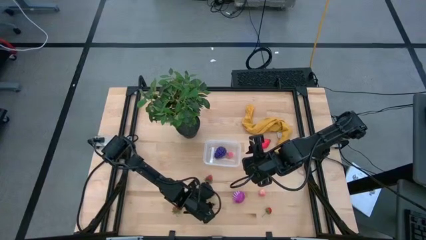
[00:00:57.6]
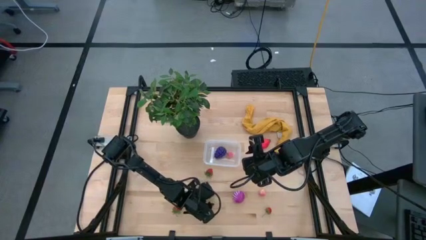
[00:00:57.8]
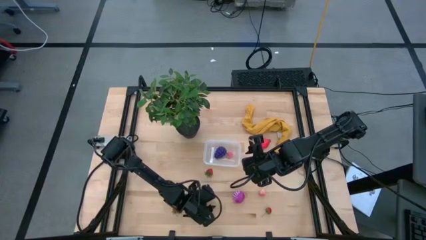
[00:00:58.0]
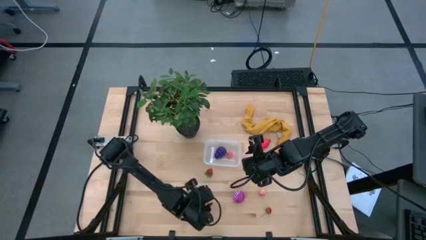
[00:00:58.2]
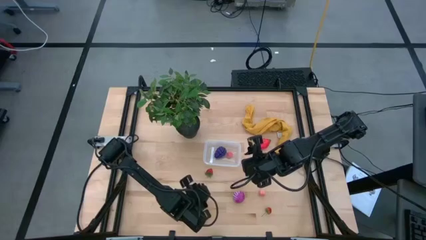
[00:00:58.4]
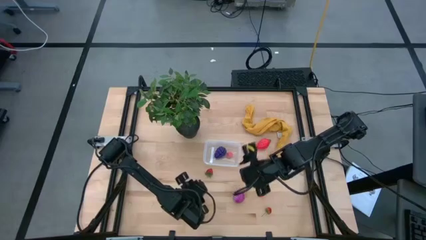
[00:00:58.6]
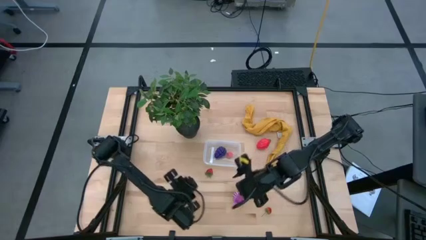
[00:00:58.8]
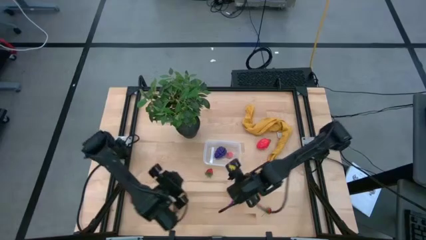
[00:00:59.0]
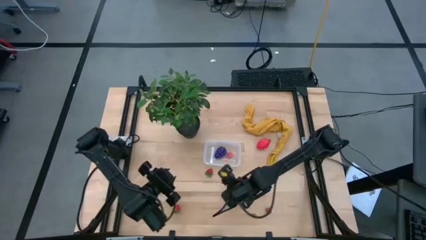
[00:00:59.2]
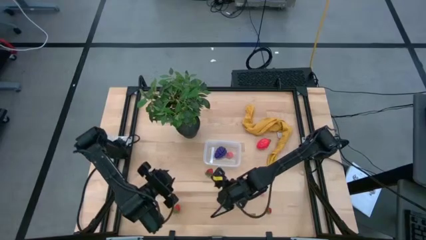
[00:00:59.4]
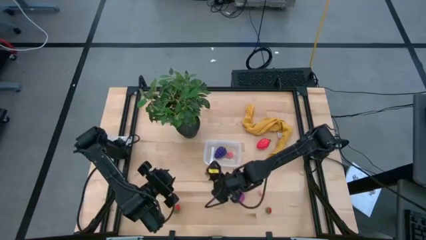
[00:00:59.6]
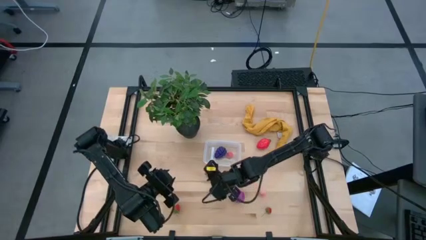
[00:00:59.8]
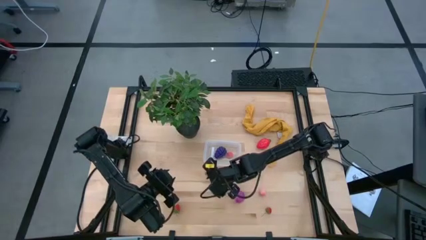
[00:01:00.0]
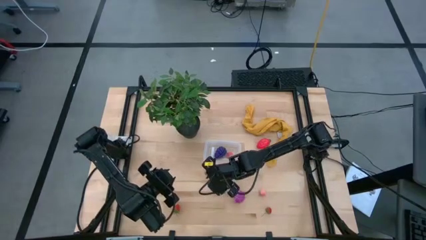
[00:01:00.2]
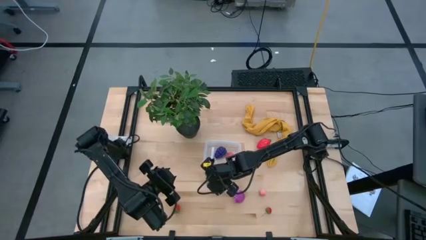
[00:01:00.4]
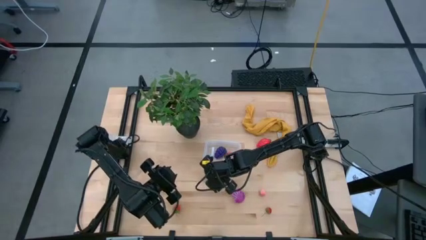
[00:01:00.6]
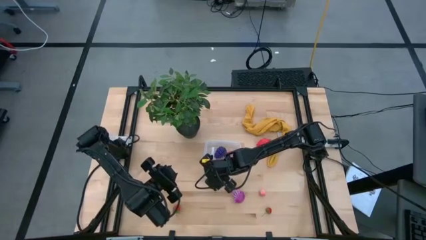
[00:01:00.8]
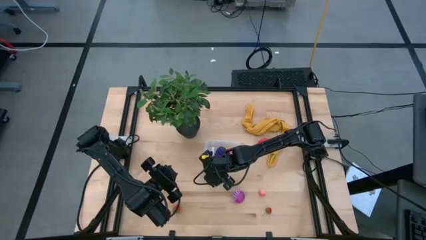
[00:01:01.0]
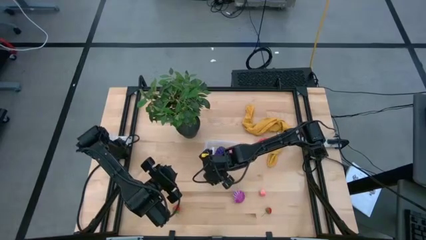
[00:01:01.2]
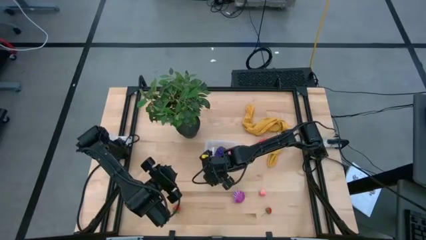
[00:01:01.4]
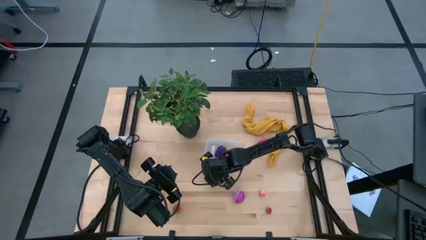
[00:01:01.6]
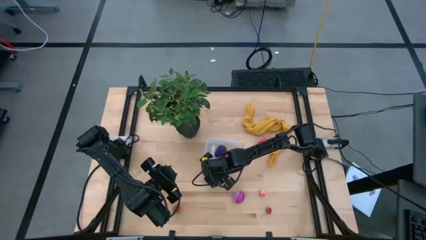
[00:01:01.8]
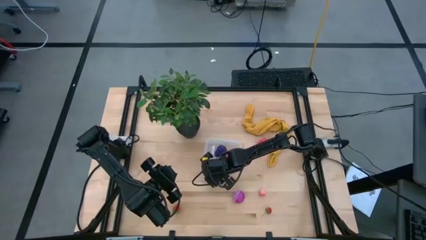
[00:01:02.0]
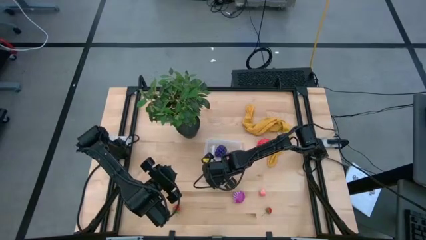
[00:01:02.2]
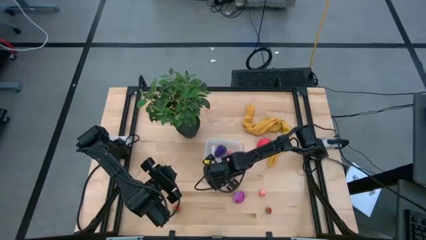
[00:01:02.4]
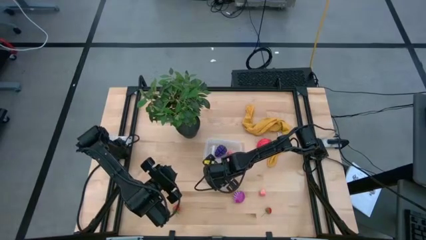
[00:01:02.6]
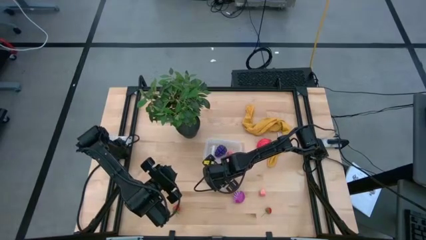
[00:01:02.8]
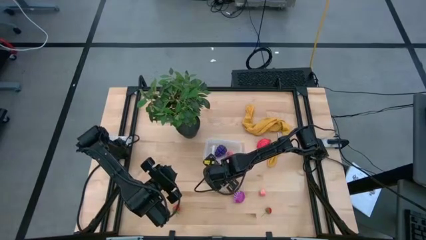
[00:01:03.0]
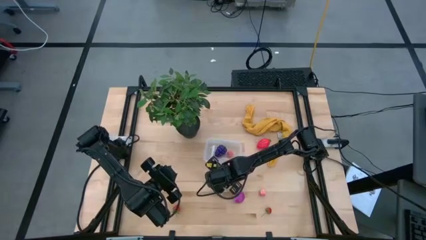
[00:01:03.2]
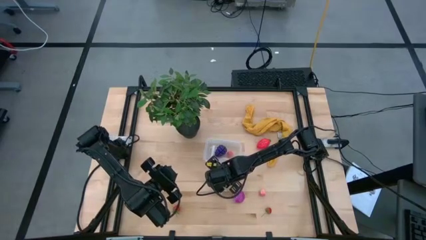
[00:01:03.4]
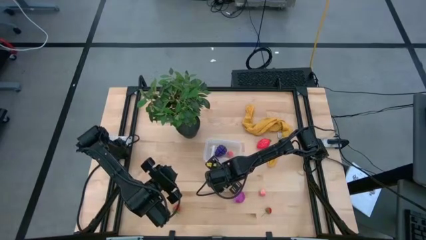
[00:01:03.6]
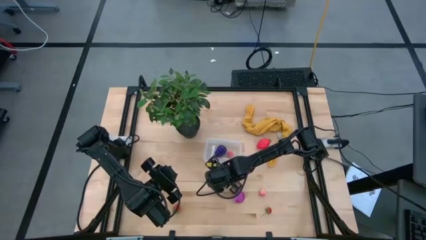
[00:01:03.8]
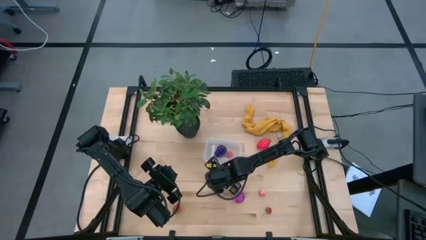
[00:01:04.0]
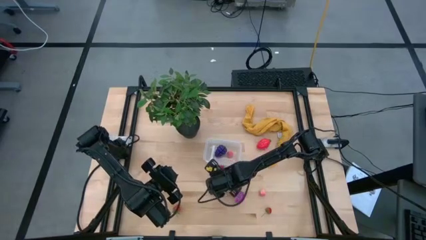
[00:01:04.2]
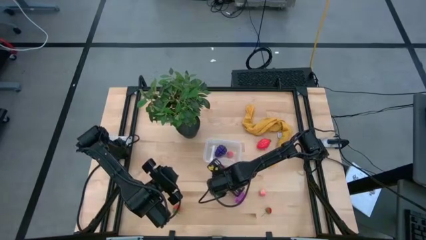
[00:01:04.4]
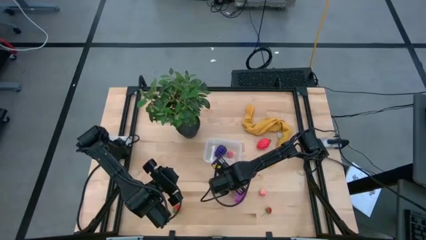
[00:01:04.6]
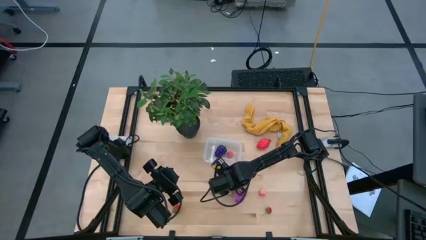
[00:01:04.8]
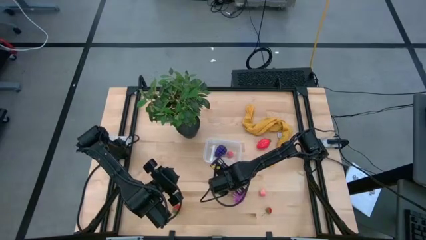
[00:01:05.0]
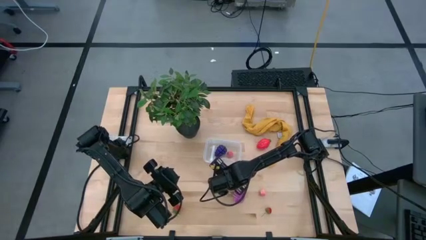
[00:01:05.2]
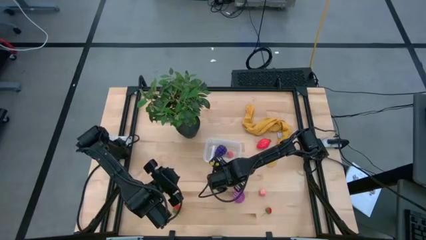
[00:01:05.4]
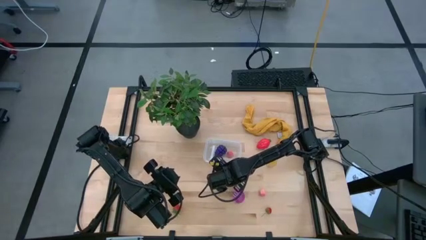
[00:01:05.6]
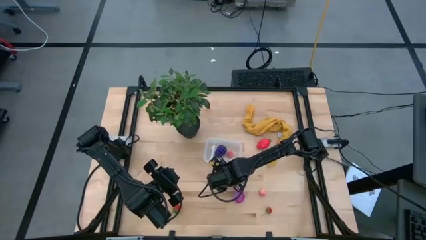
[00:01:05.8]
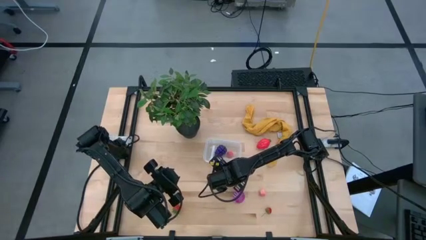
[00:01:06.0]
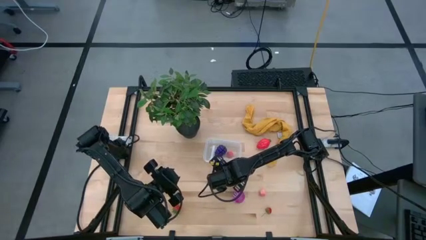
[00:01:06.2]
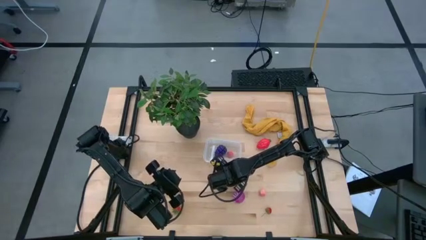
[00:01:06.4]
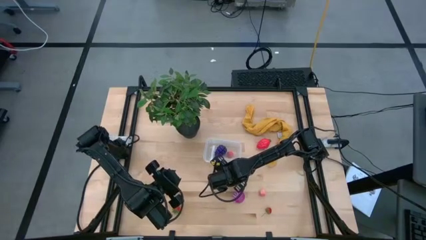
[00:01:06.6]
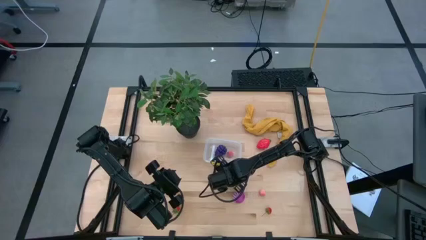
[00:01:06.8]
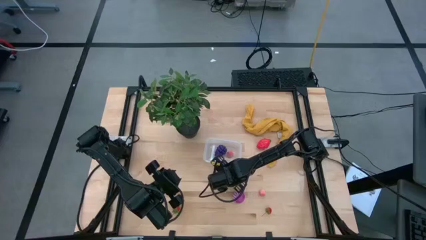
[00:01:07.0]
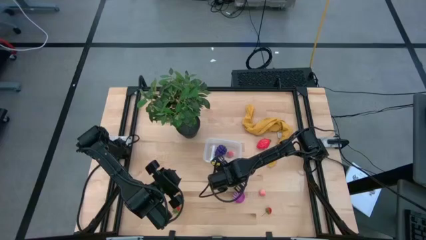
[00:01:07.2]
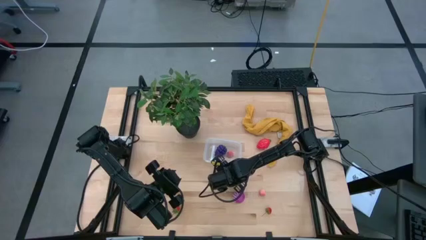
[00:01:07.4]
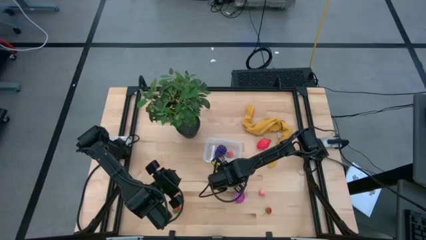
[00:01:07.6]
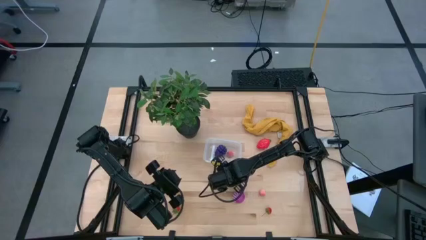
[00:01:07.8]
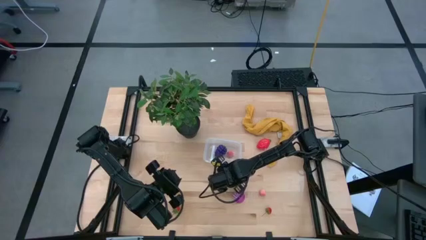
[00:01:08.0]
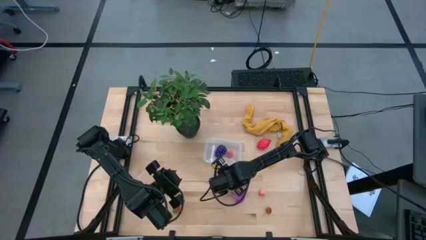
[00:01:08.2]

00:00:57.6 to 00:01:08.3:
Task: Pick and placing Produce into tupperware
Put the middle strawberry into the bin

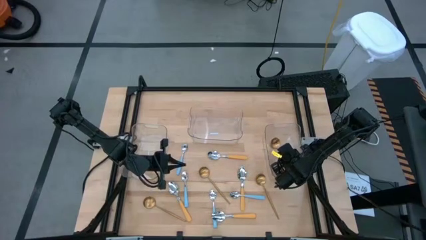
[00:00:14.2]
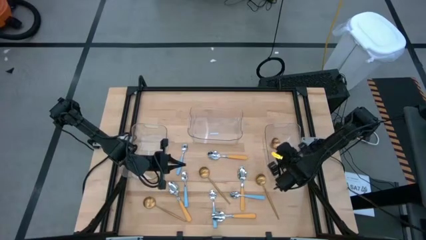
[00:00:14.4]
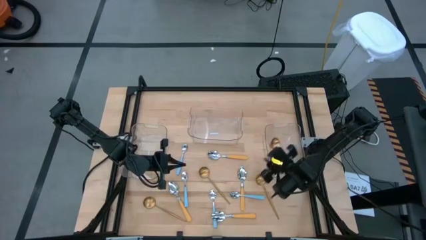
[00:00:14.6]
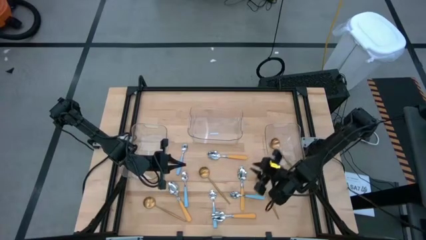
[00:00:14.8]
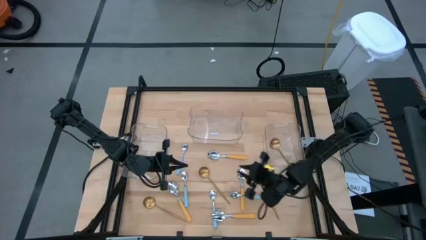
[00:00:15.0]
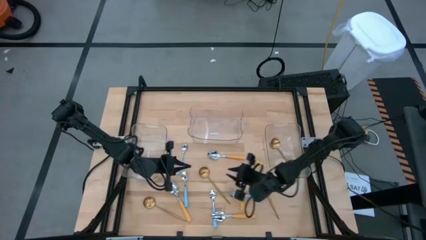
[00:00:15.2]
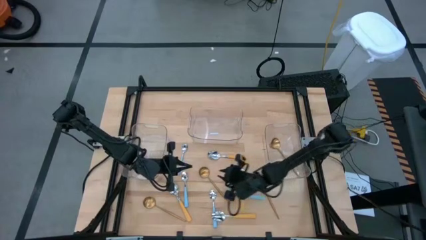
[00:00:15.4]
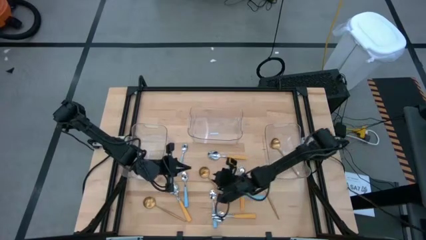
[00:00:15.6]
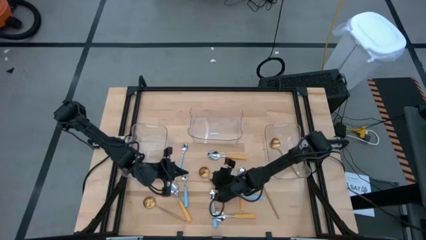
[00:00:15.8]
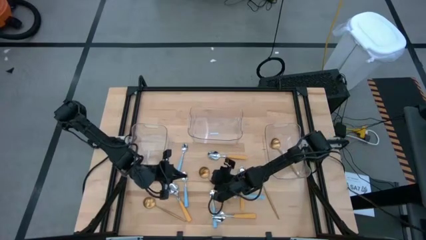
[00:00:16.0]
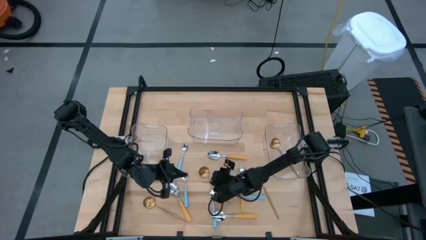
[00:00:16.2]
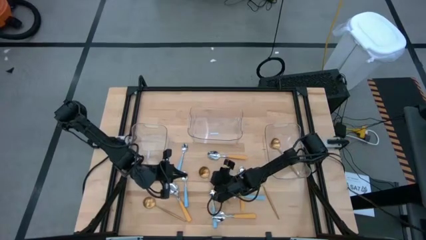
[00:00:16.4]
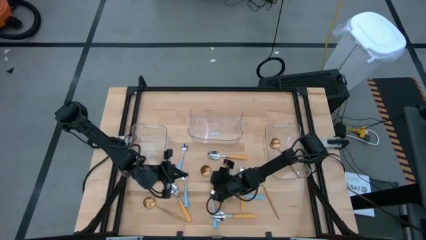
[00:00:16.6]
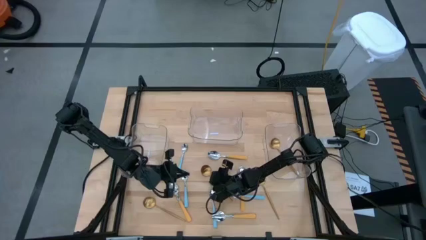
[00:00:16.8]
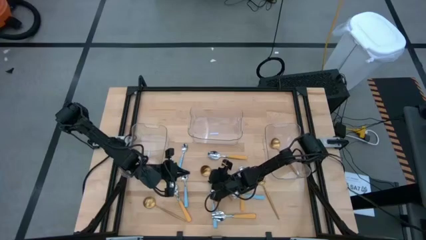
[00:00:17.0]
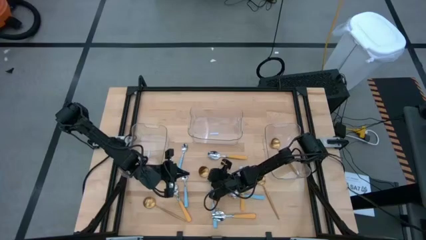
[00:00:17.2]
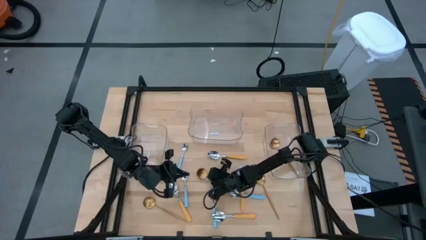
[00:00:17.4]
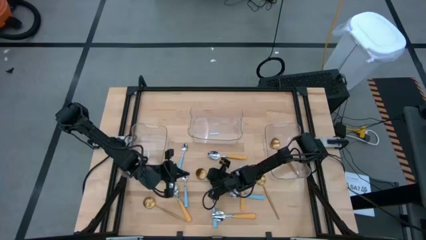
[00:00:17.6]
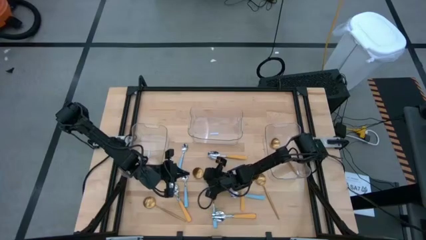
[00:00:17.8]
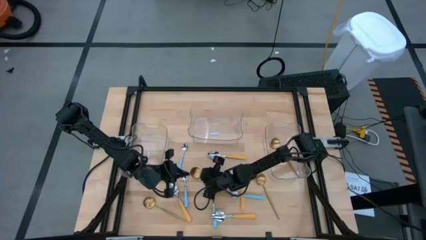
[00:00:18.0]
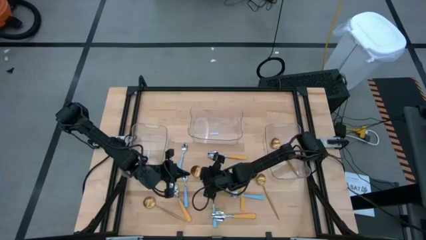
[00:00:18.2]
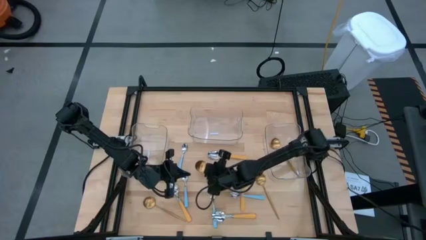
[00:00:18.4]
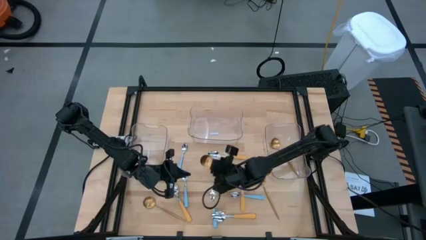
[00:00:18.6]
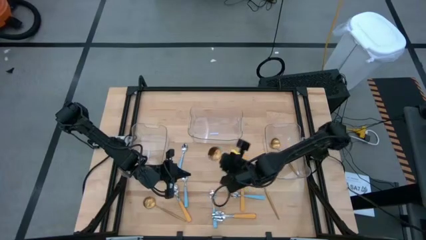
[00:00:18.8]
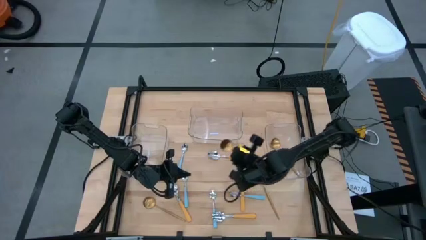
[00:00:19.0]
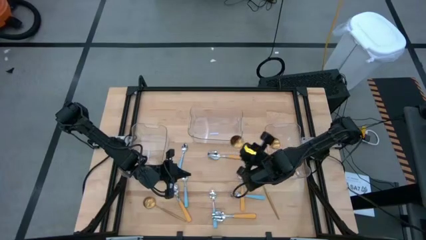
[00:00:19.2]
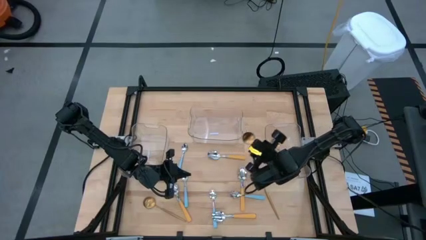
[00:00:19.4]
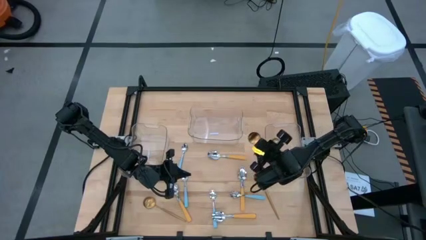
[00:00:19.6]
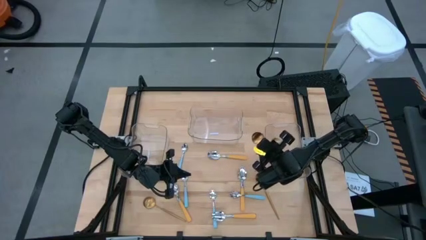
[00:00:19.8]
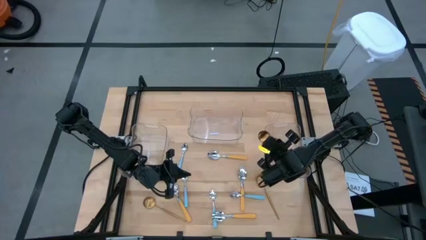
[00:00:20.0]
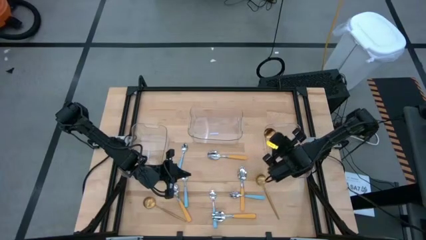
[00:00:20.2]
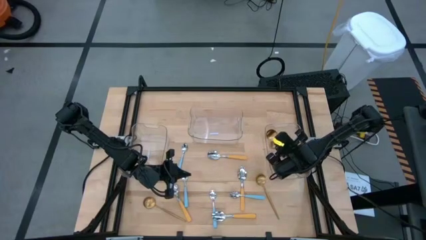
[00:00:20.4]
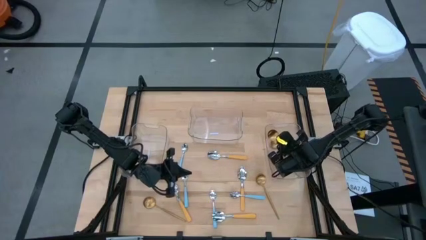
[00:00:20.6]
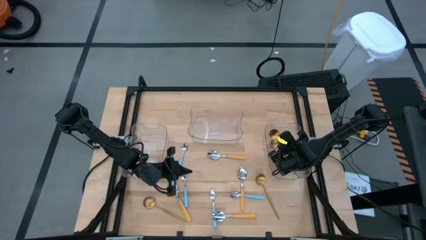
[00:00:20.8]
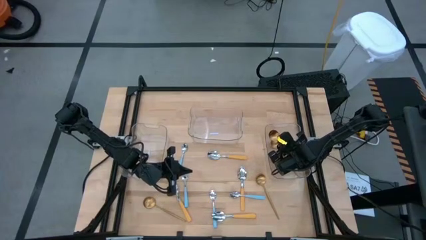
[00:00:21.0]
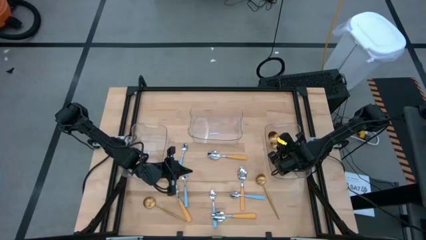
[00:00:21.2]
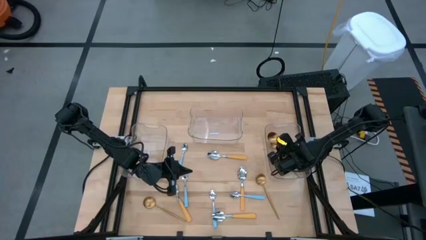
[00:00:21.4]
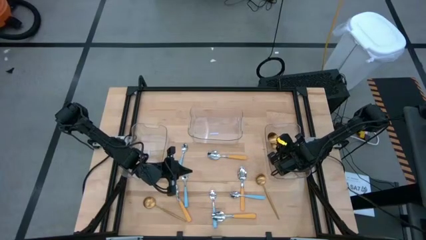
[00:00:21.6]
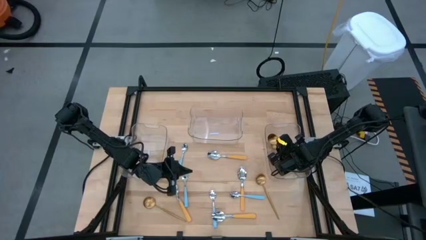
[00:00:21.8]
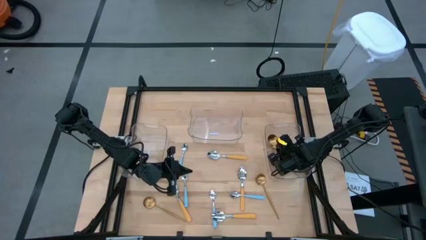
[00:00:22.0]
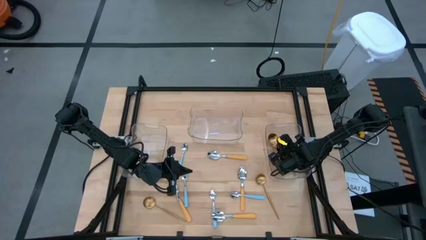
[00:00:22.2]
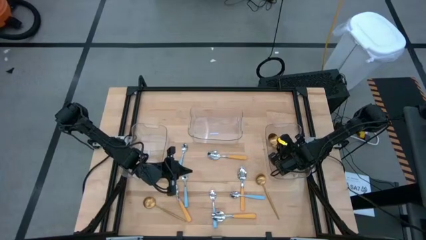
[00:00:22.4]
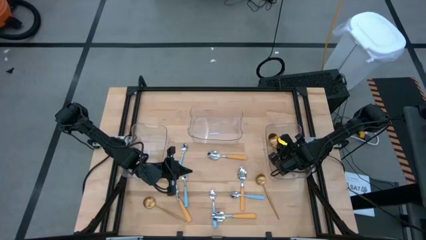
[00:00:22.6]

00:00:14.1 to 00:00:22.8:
Task: Sort silverware by color (type)
Put the gold spoon into the right transparent bin
